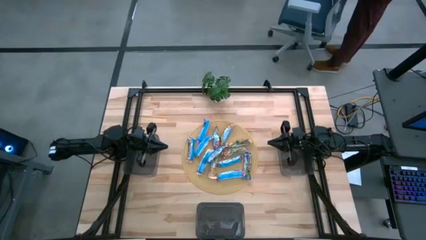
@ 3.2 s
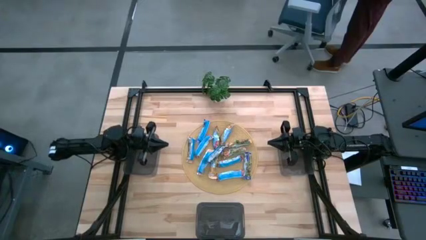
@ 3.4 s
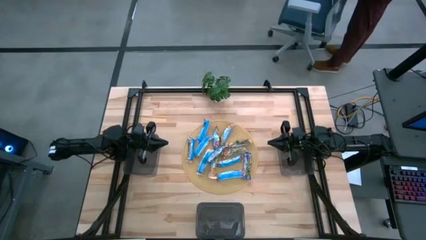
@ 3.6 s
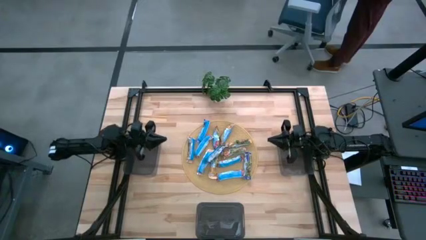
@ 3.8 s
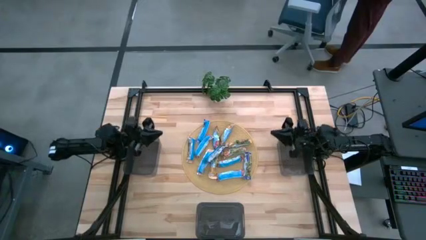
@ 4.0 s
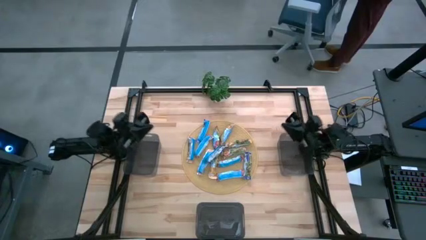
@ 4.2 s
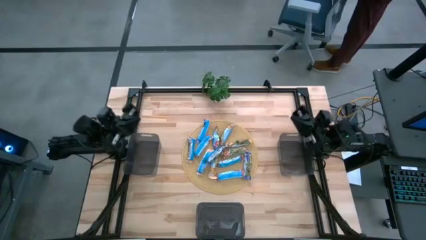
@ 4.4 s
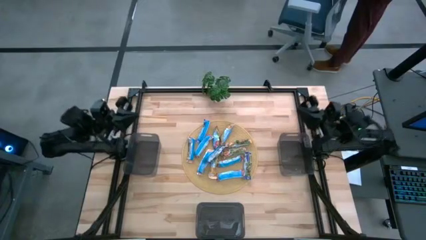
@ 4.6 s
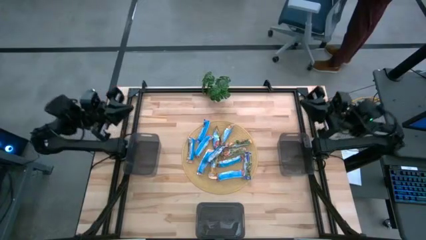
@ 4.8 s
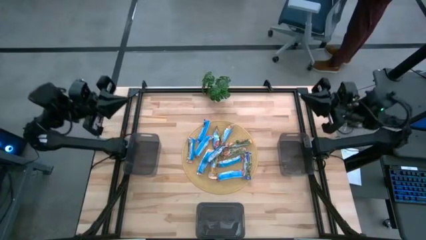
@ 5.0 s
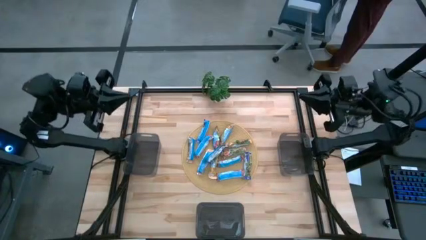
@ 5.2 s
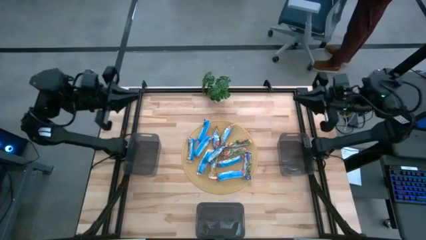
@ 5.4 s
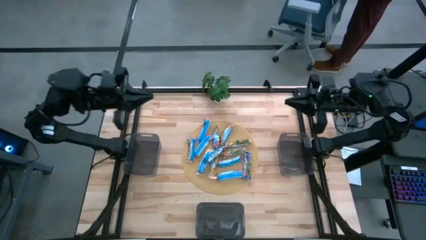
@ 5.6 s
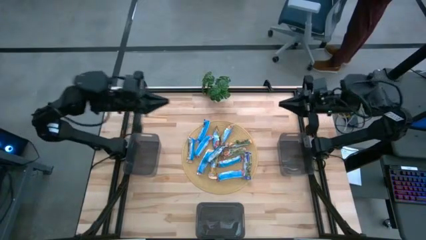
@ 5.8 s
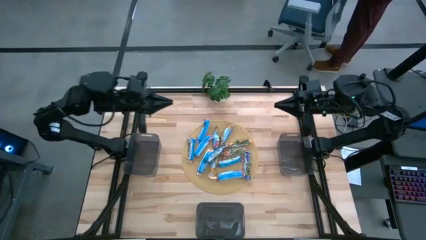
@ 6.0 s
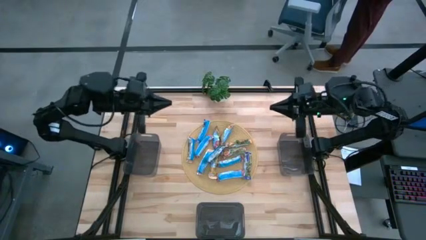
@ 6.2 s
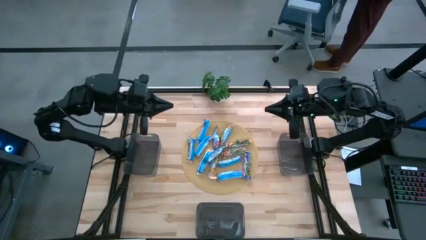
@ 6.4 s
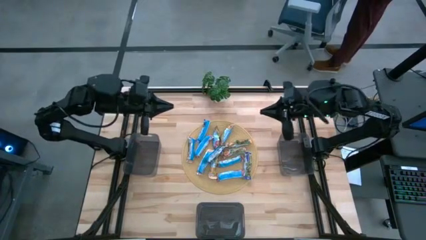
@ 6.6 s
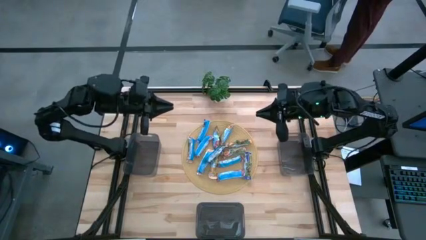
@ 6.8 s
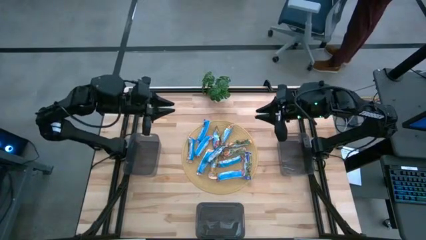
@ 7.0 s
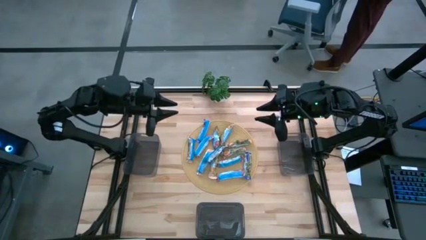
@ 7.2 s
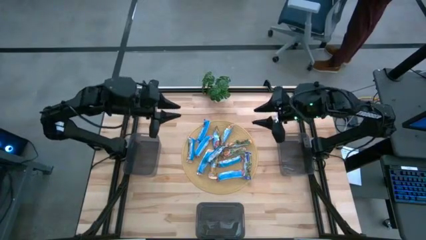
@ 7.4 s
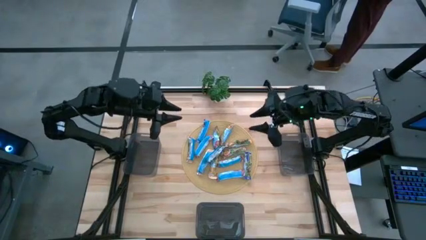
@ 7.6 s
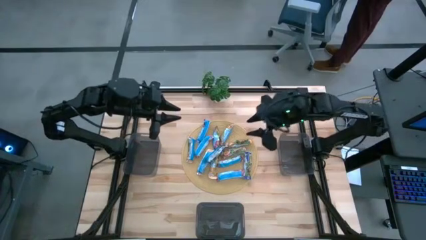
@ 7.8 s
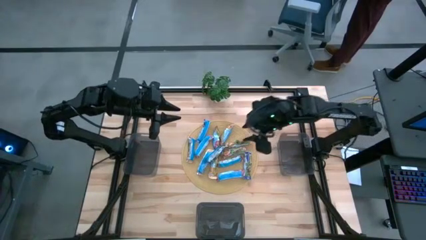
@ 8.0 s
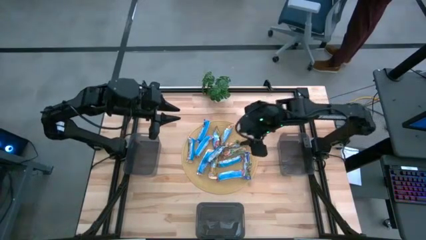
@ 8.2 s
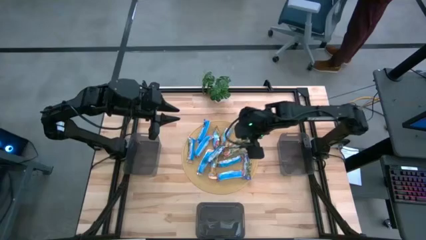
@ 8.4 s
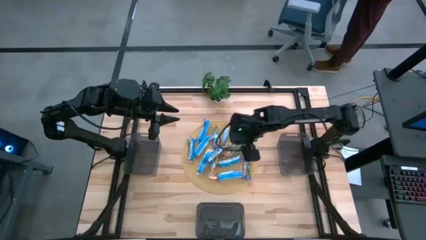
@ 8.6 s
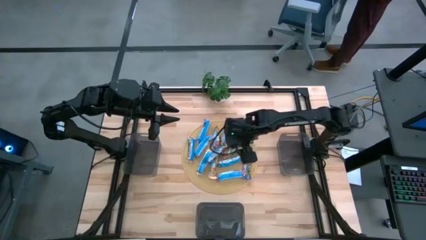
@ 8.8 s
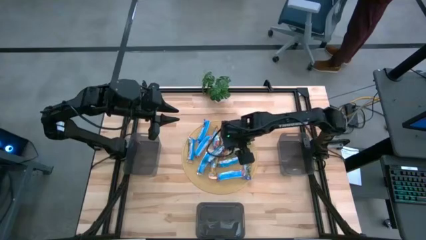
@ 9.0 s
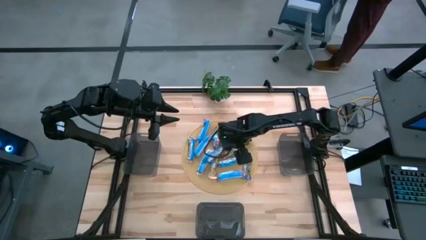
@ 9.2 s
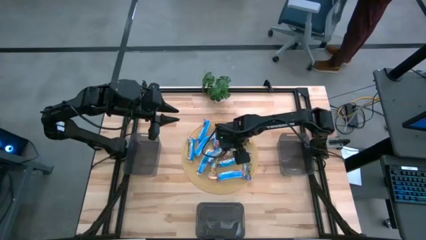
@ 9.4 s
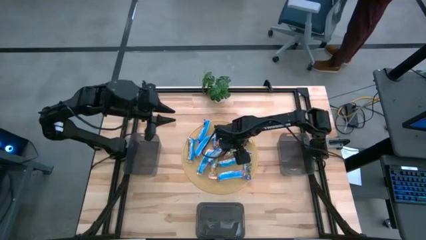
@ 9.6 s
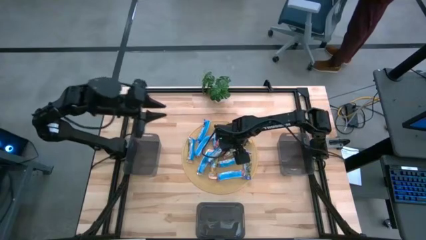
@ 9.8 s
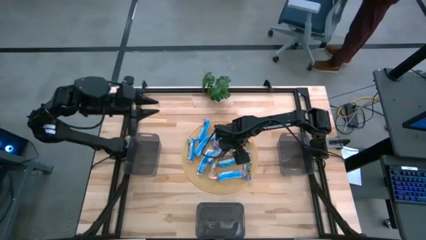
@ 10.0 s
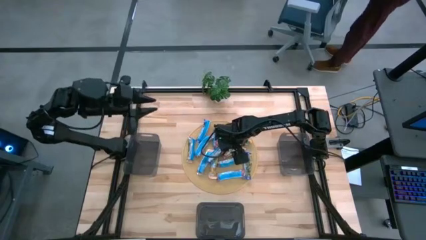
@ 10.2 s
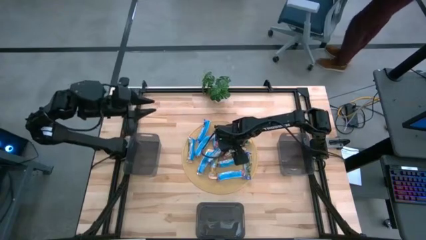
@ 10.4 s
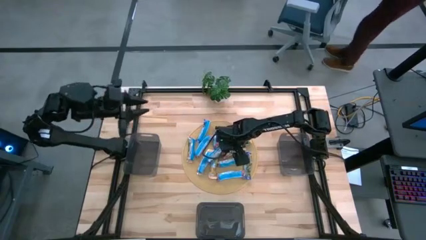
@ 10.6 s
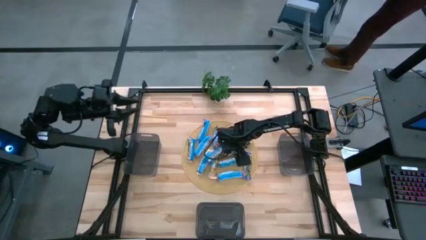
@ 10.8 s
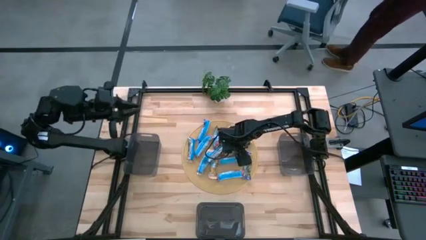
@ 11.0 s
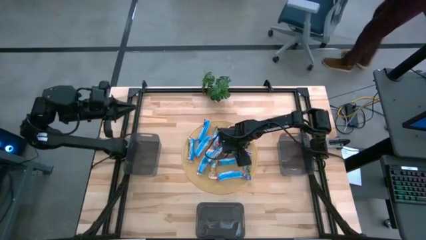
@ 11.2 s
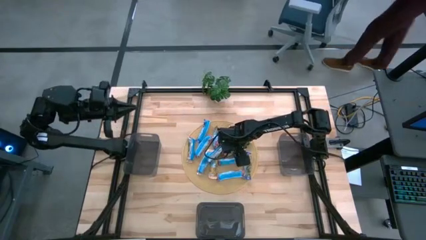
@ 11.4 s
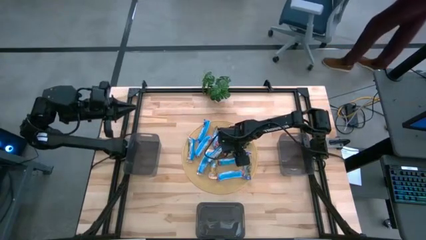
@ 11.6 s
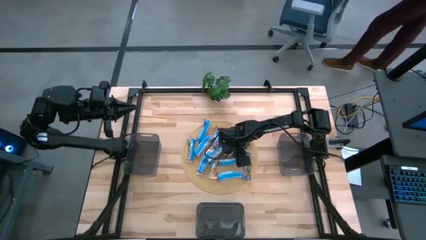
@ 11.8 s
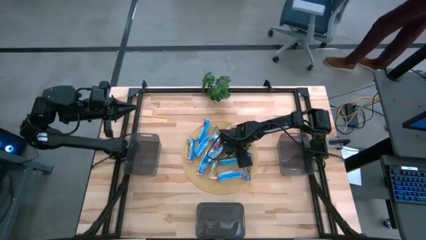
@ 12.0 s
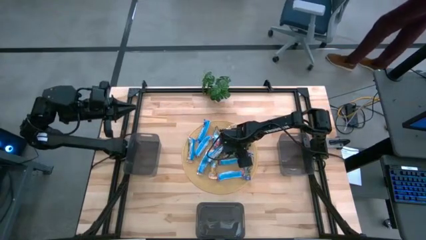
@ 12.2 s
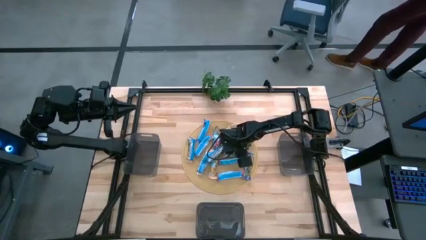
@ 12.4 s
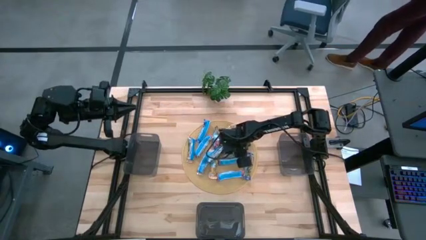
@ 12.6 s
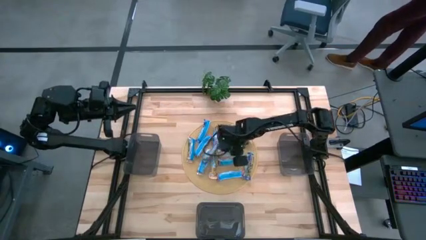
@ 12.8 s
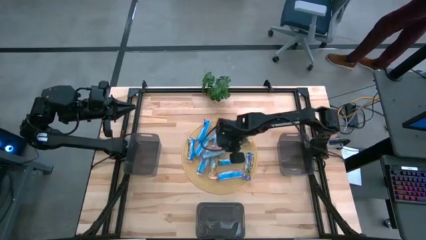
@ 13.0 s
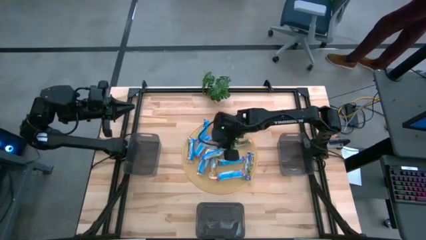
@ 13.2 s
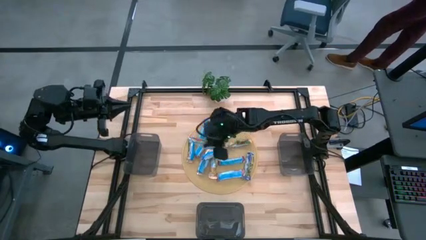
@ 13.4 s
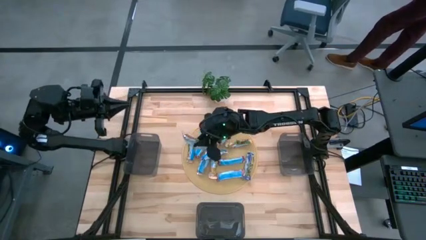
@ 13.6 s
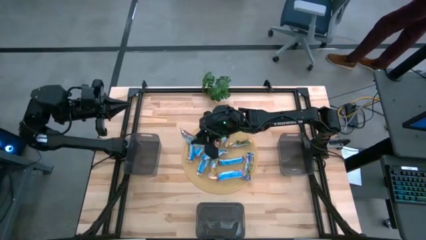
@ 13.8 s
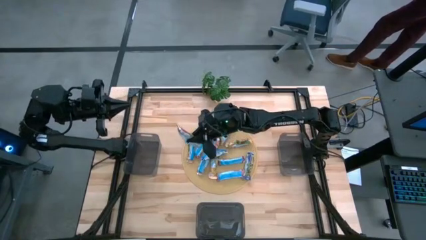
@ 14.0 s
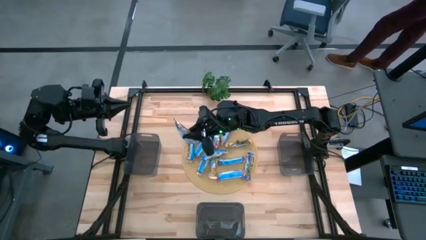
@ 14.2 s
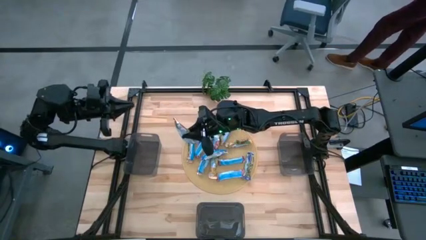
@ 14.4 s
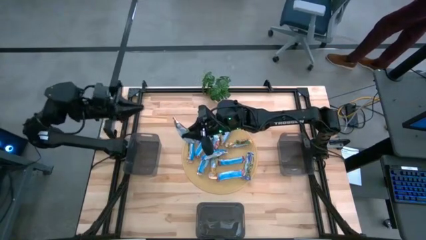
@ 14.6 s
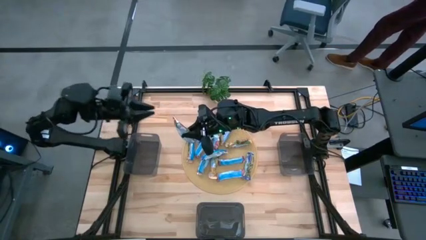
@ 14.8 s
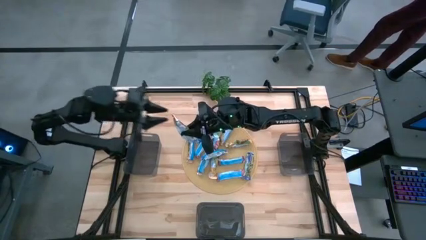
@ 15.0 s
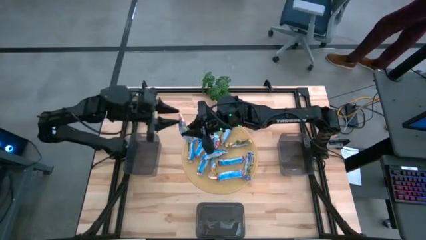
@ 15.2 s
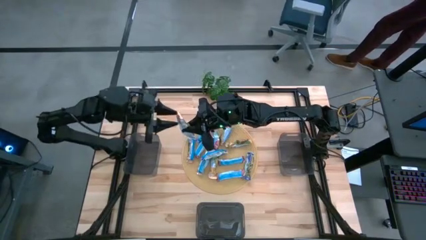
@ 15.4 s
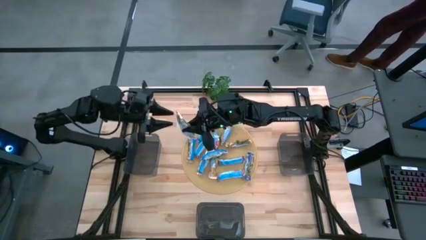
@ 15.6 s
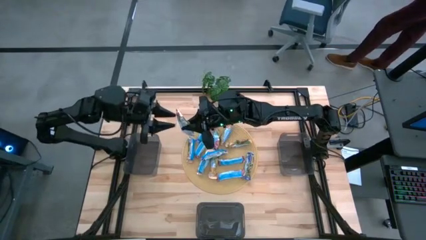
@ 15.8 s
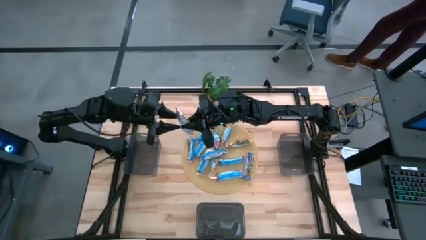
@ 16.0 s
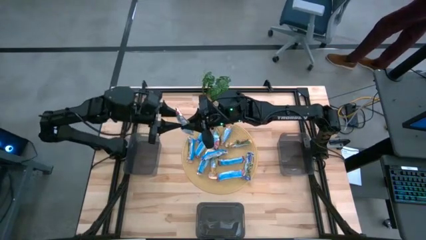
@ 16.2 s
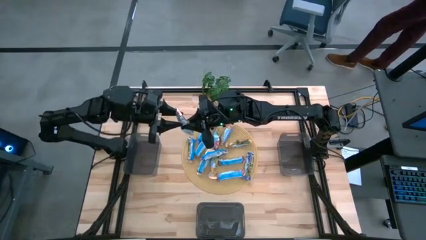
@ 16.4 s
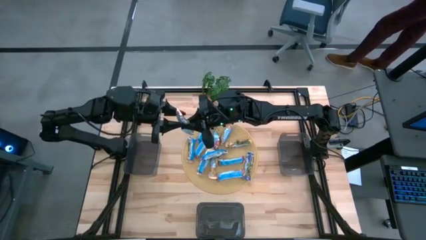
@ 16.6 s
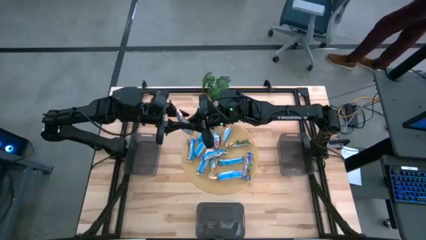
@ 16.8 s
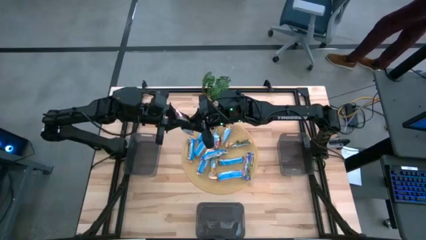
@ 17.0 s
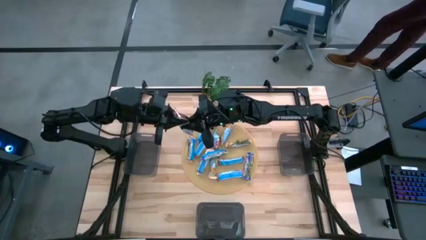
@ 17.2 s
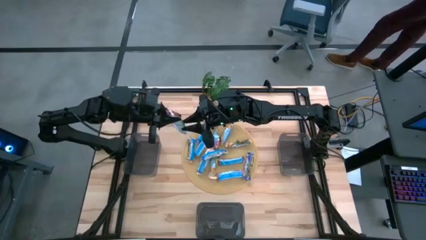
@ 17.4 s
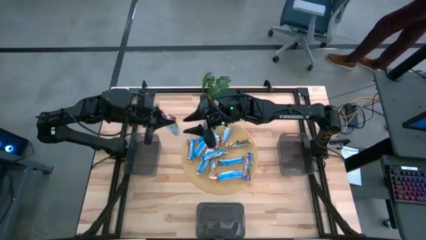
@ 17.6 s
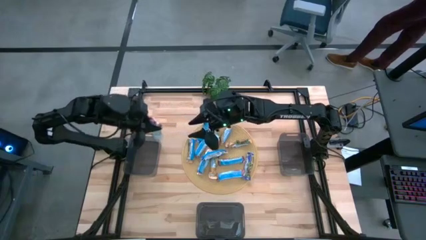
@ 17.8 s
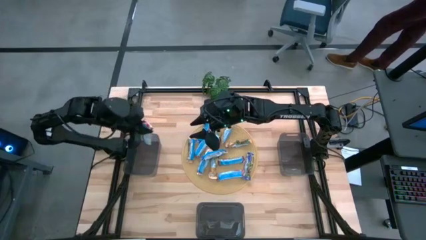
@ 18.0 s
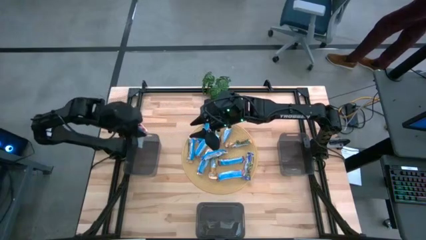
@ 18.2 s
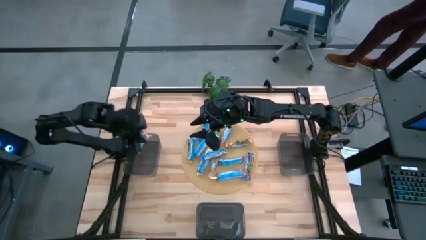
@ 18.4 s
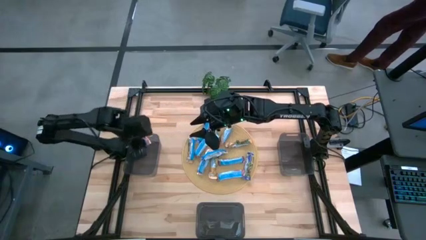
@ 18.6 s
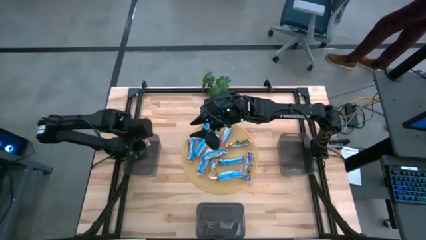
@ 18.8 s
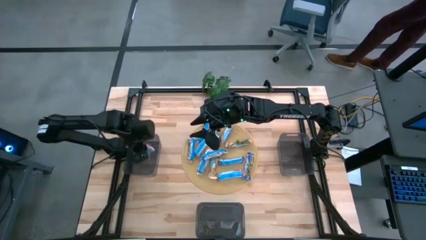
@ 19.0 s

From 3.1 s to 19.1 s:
Task: Pick and place Granola Bars by type
Put the red granola bar into the top left bin
